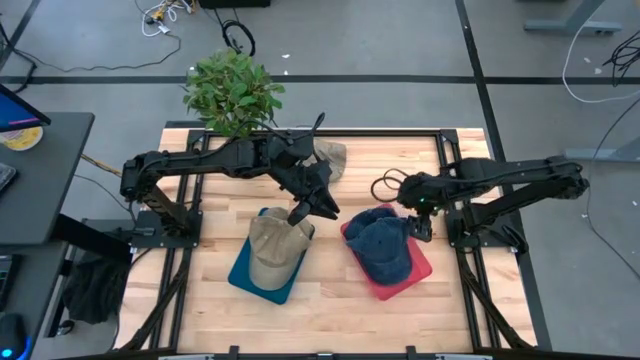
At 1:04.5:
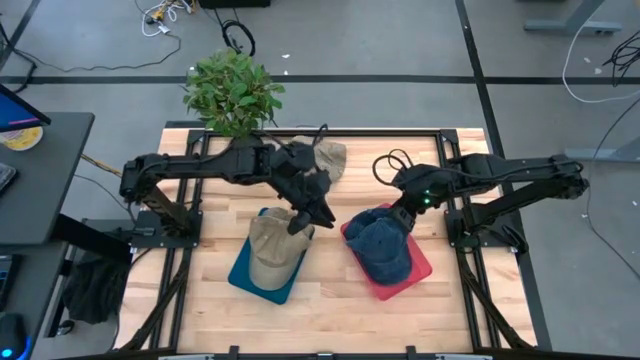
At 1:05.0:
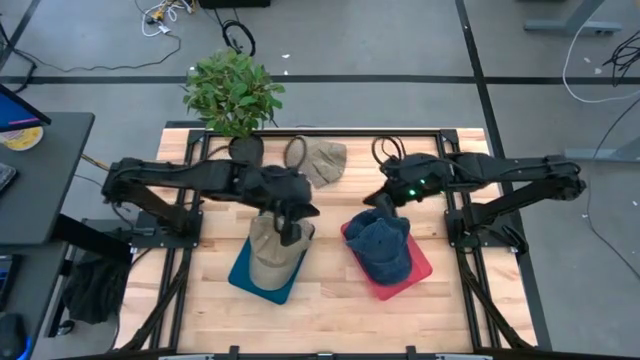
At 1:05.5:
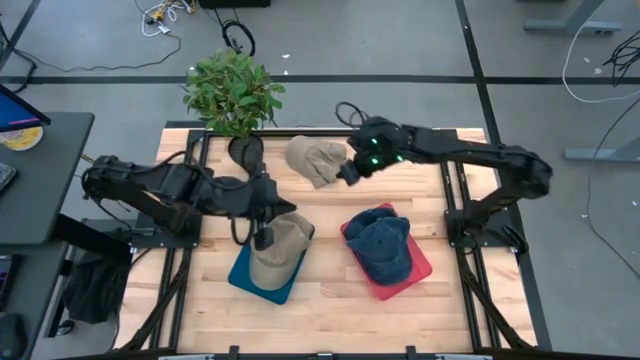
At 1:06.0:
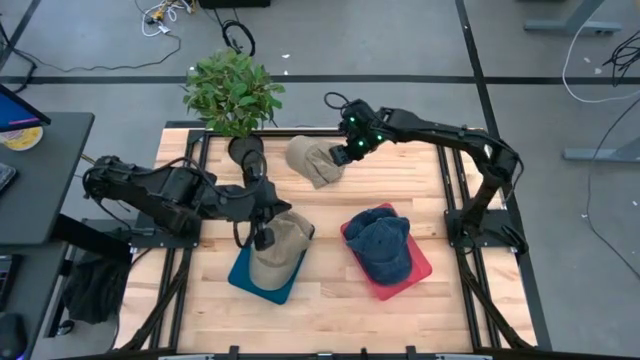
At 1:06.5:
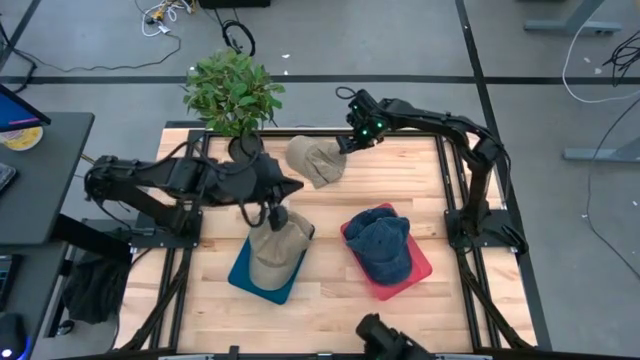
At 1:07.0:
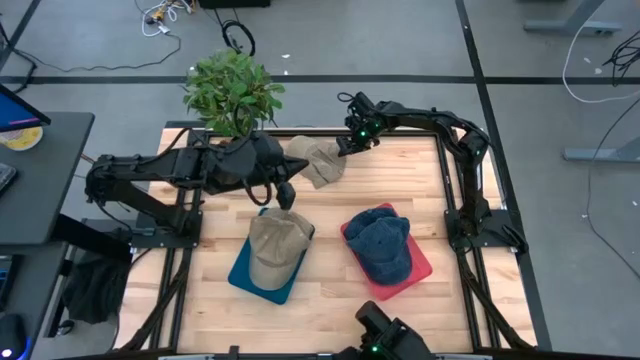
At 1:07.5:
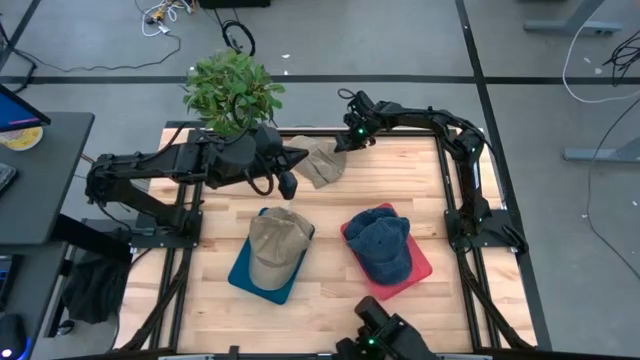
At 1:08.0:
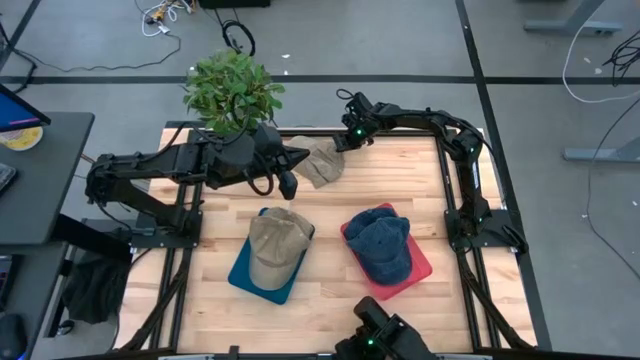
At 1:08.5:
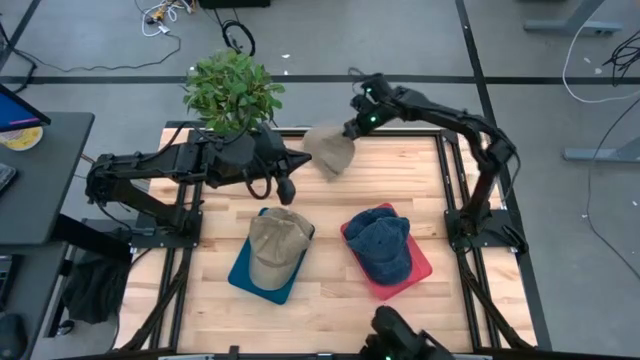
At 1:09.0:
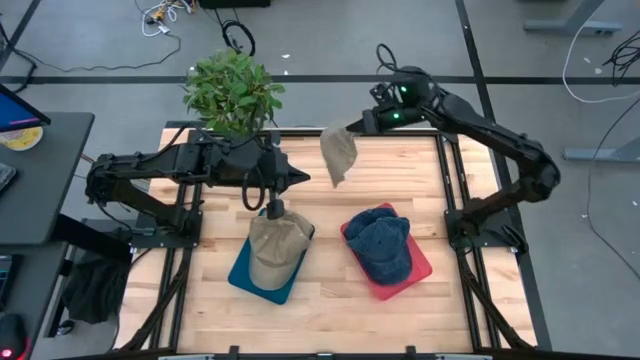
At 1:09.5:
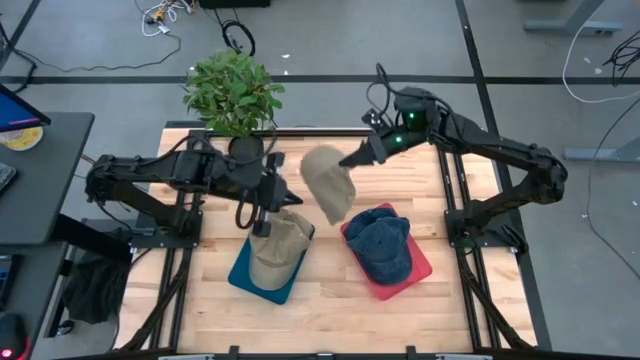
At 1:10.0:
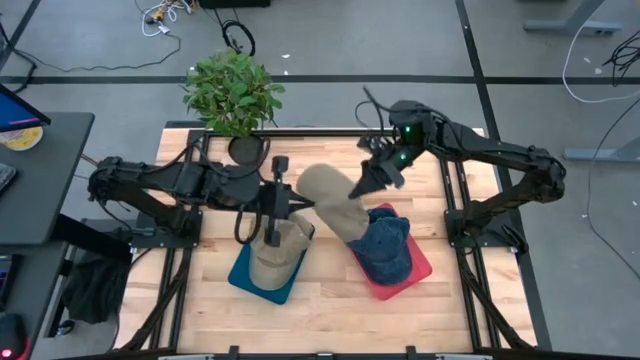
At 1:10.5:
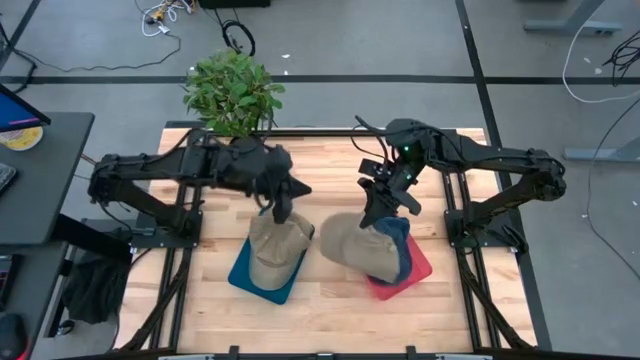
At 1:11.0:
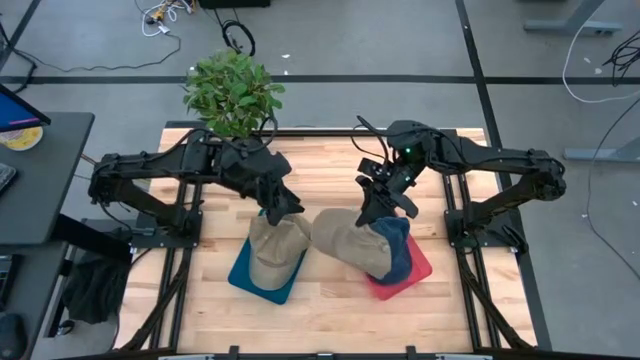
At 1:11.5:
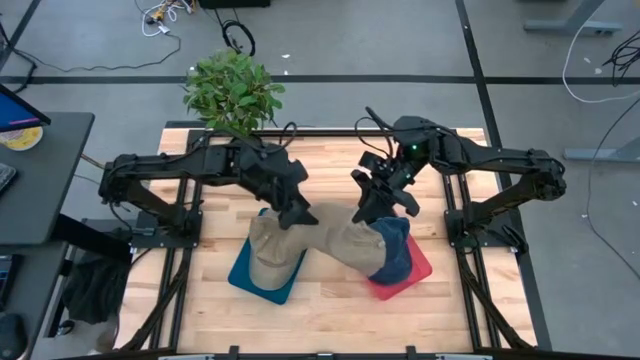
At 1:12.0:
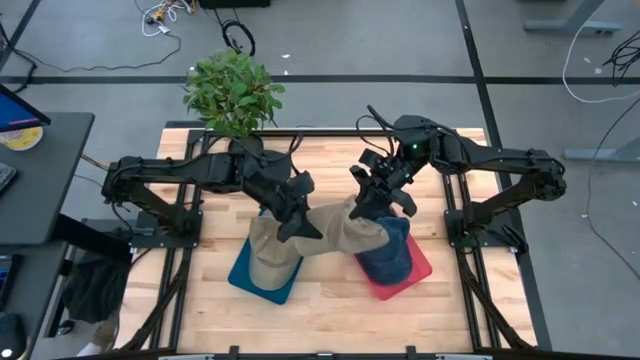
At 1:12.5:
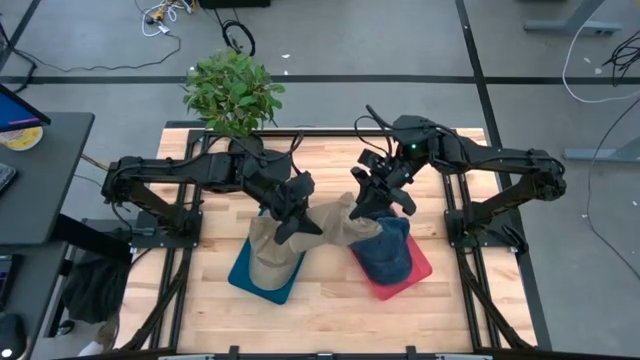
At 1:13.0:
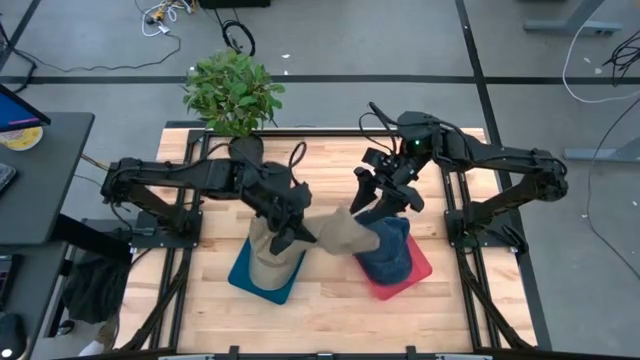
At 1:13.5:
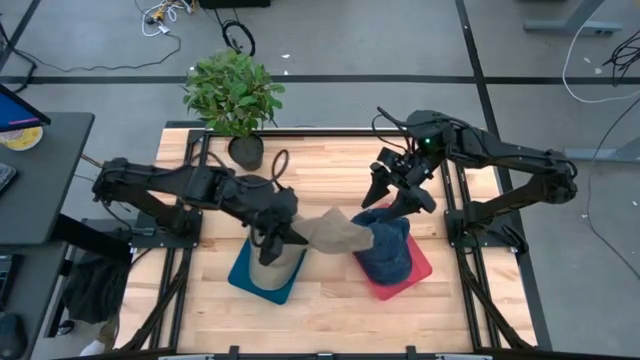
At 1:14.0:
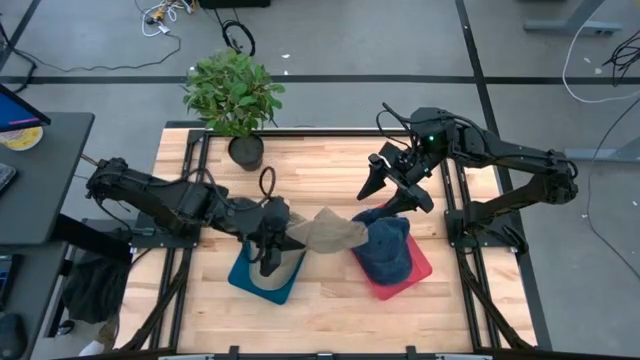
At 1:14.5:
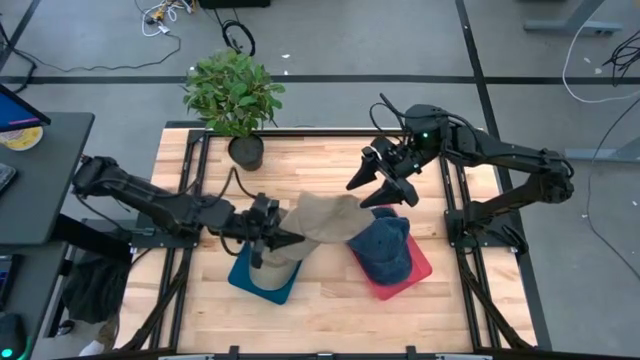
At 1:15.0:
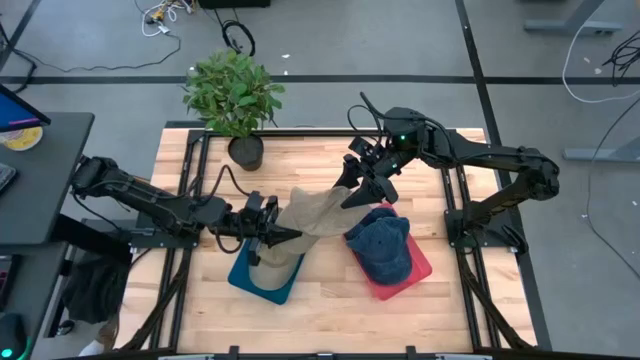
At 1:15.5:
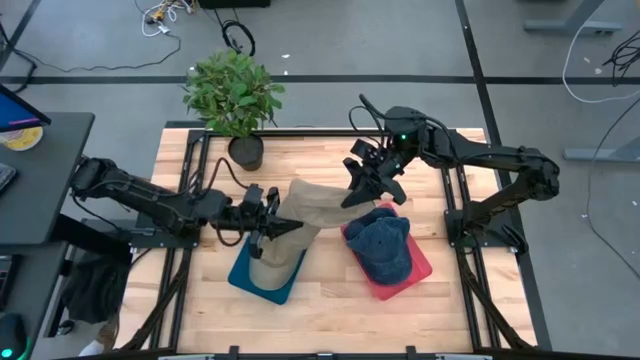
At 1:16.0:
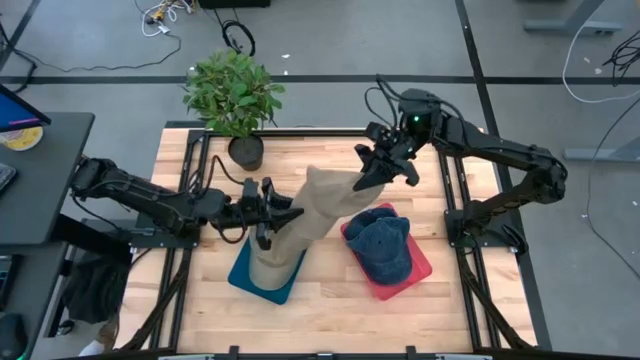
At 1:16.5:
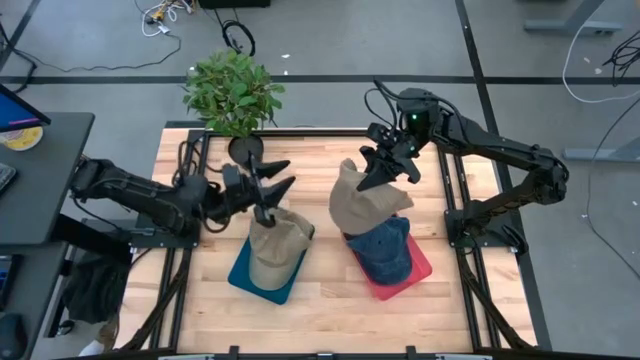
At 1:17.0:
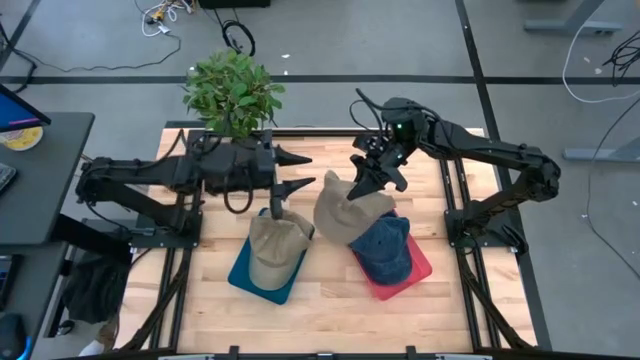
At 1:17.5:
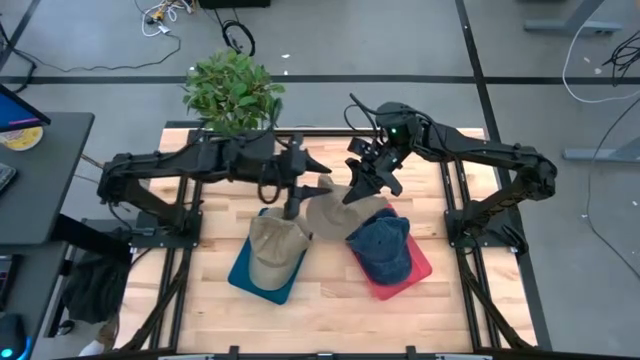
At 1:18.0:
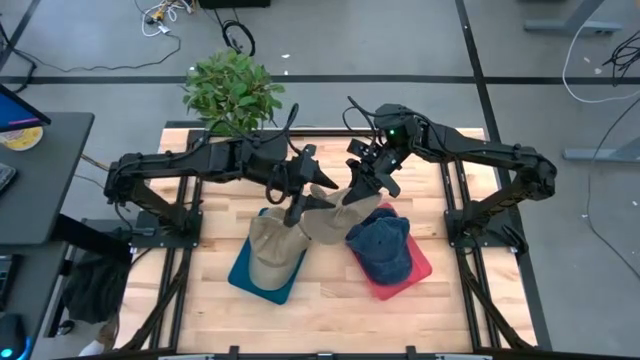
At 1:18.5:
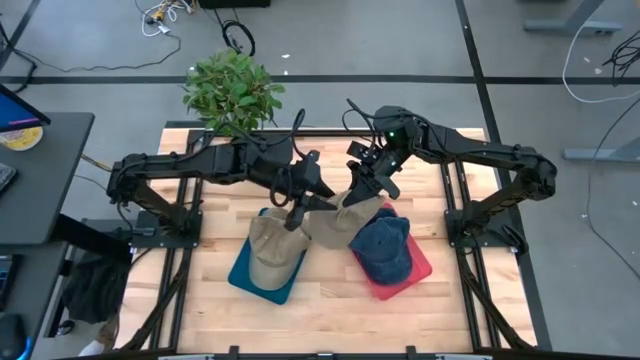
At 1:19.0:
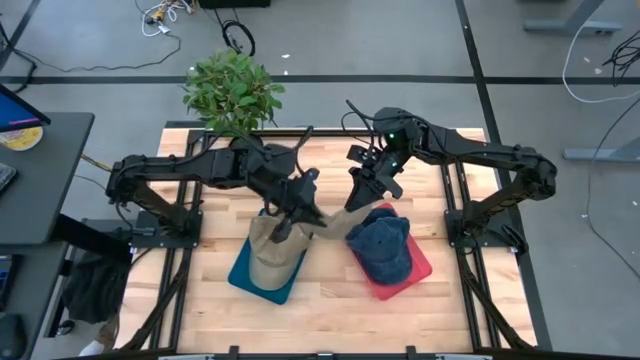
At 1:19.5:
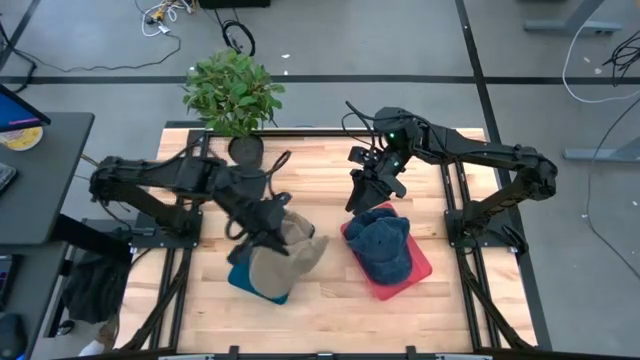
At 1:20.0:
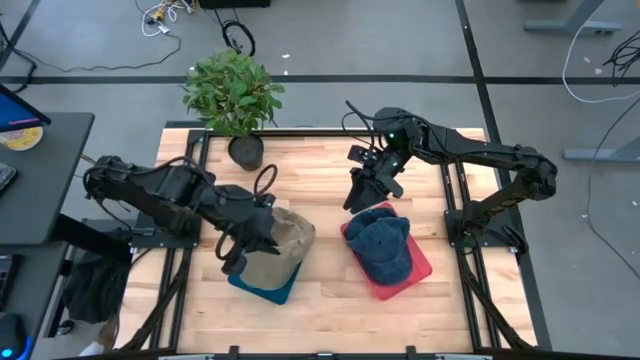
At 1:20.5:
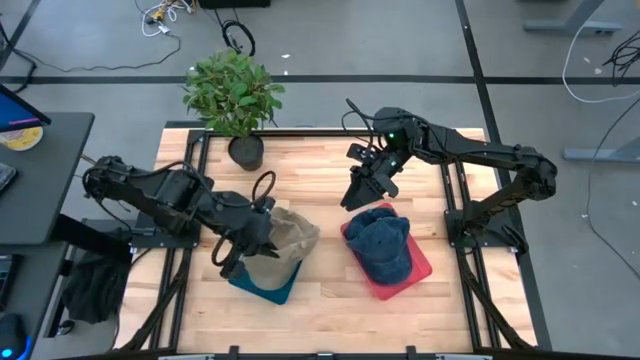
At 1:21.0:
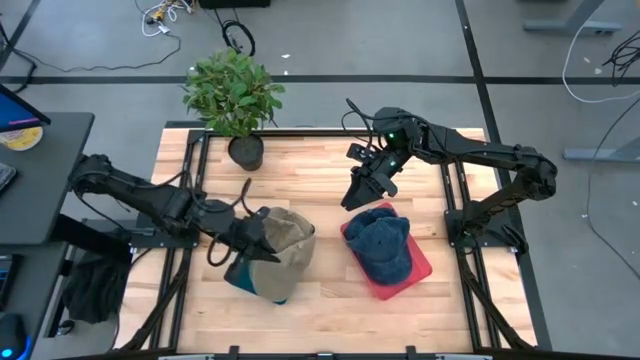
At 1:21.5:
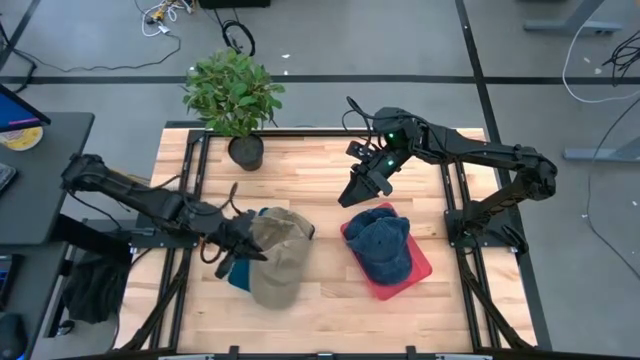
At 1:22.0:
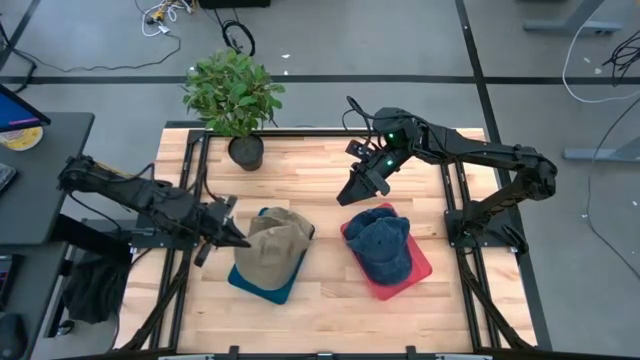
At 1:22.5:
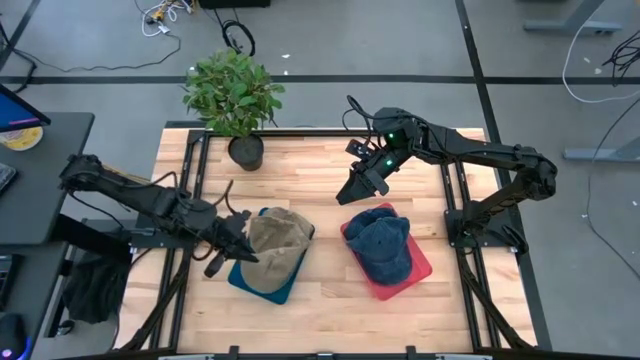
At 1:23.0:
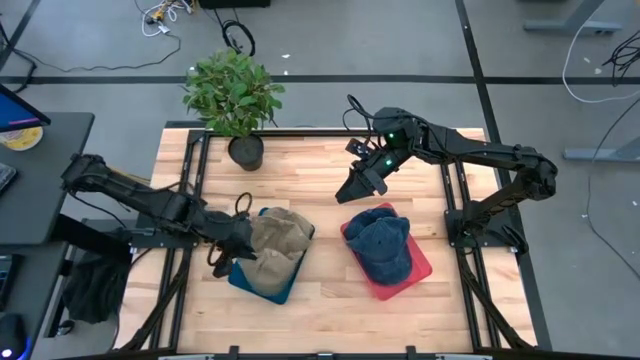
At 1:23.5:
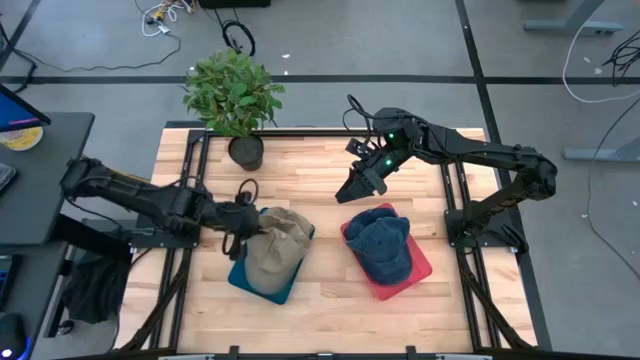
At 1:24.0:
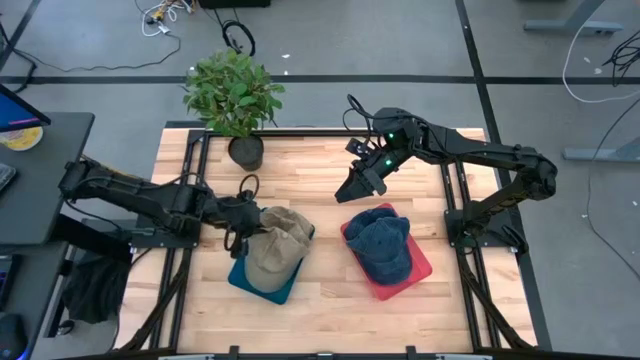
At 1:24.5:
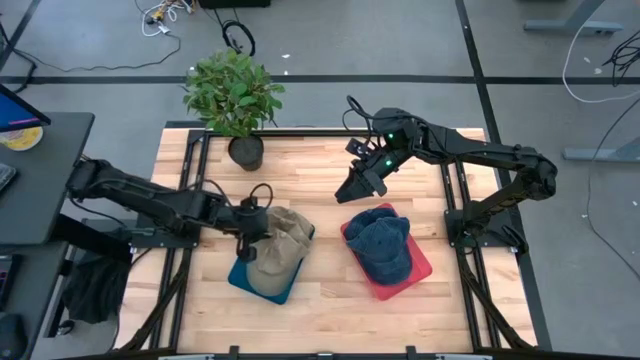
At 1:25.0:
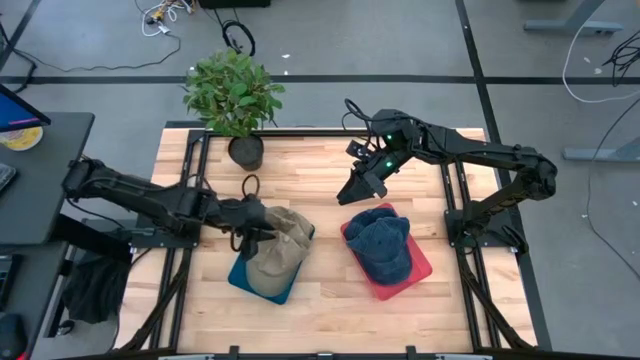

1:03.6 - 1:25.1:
Task: Pick & Place hat
Put the brown cap into the blue bin
